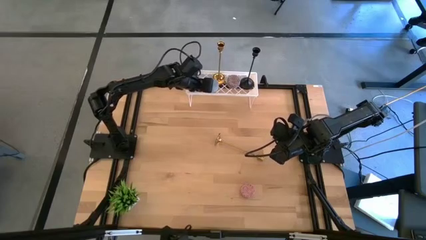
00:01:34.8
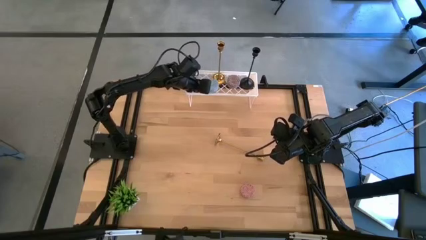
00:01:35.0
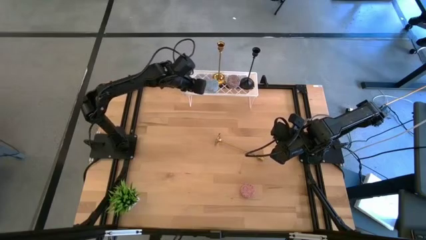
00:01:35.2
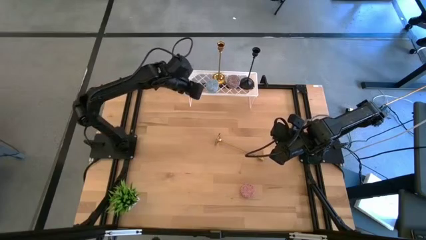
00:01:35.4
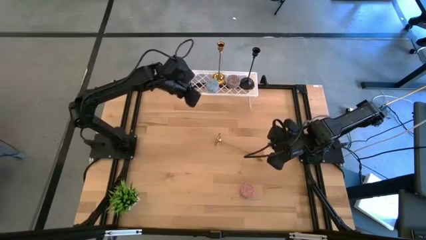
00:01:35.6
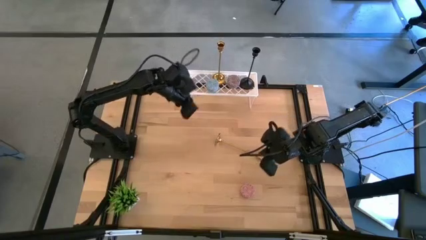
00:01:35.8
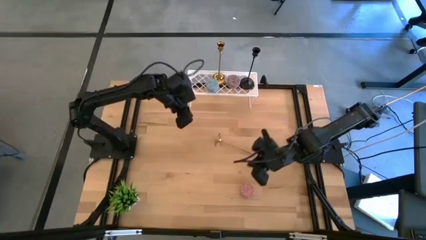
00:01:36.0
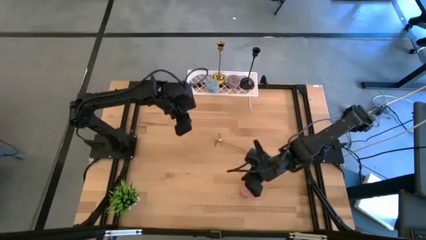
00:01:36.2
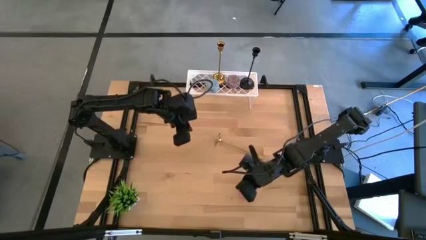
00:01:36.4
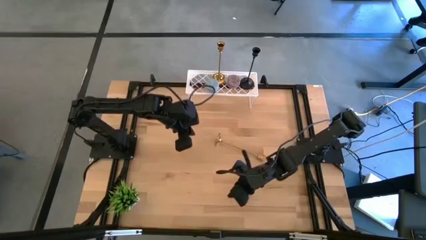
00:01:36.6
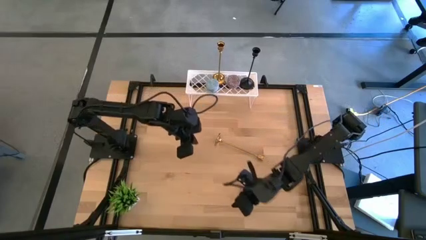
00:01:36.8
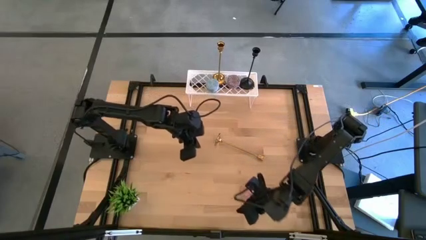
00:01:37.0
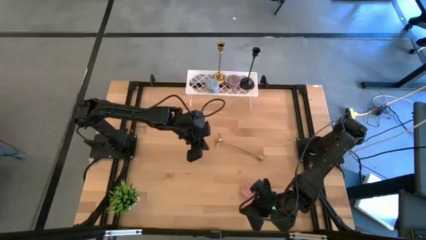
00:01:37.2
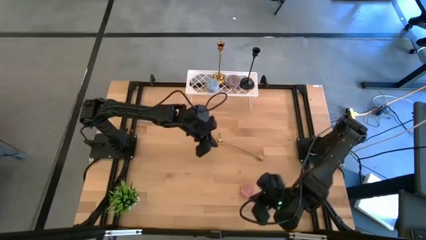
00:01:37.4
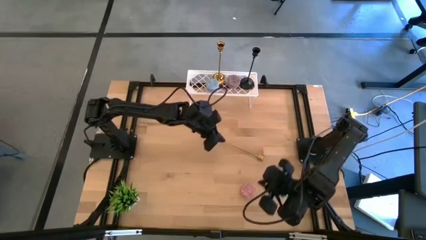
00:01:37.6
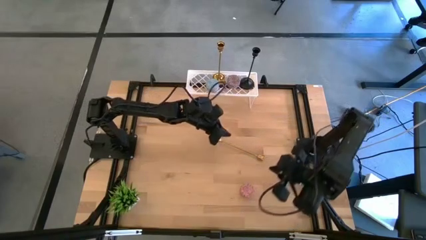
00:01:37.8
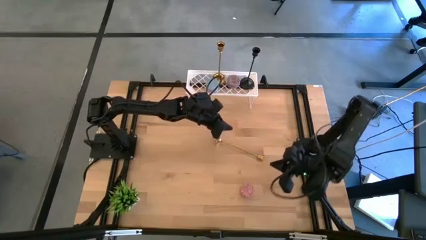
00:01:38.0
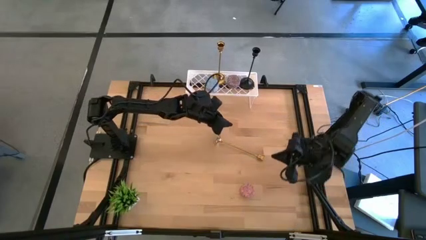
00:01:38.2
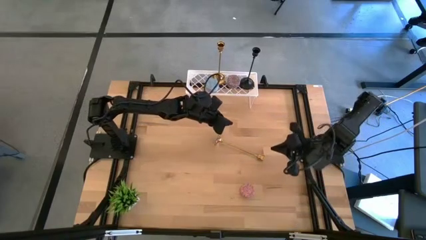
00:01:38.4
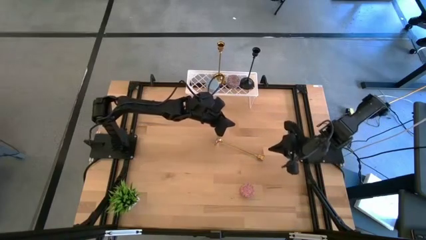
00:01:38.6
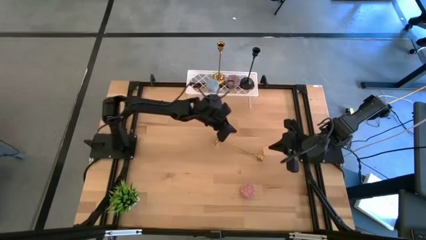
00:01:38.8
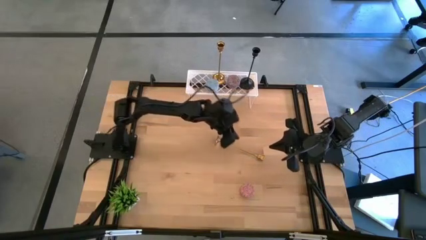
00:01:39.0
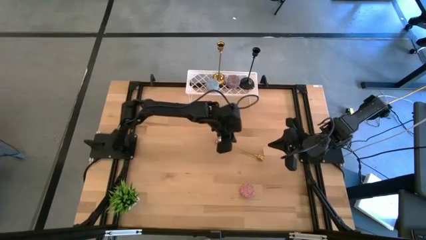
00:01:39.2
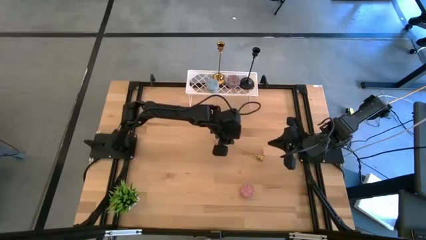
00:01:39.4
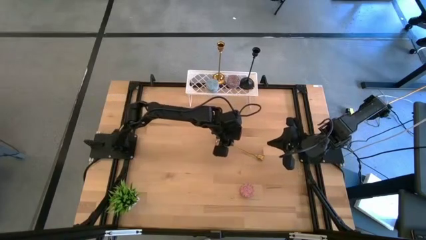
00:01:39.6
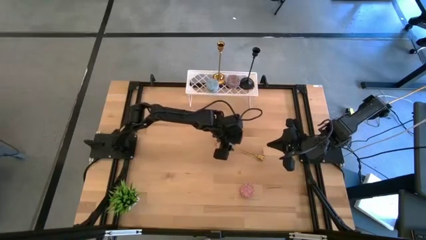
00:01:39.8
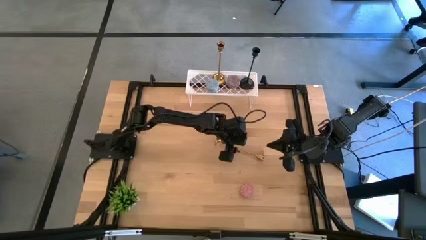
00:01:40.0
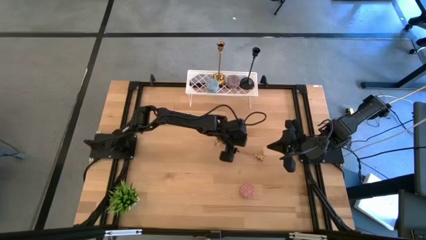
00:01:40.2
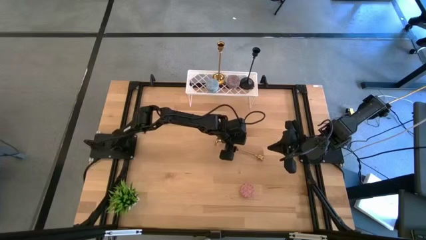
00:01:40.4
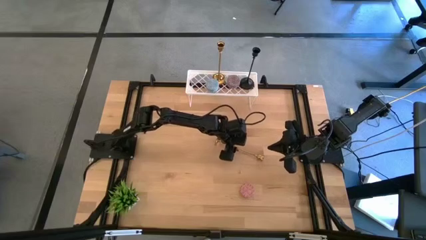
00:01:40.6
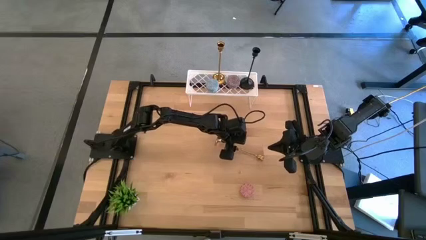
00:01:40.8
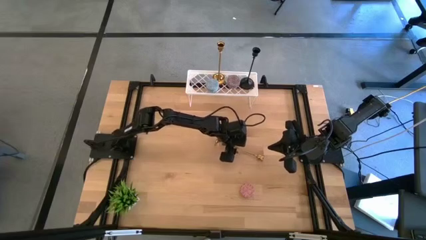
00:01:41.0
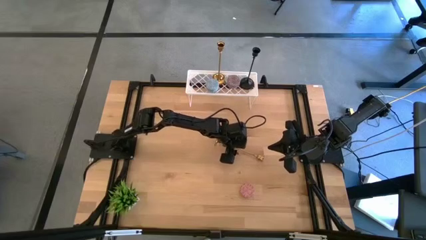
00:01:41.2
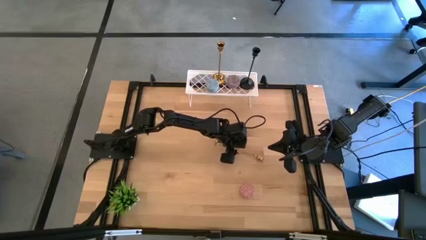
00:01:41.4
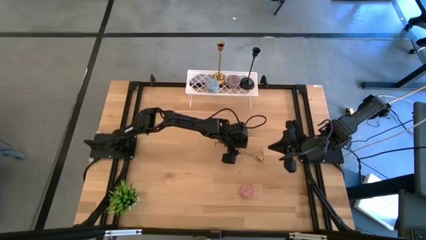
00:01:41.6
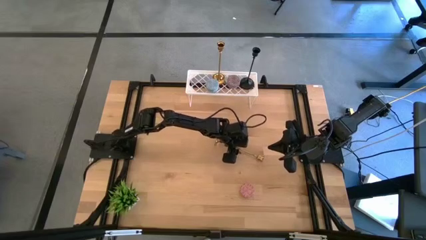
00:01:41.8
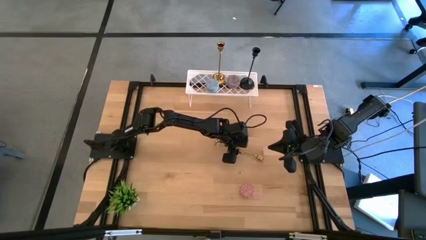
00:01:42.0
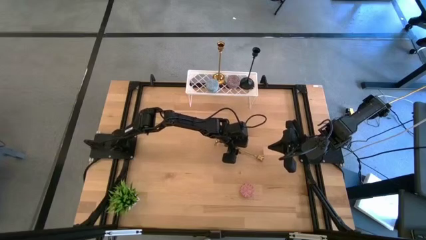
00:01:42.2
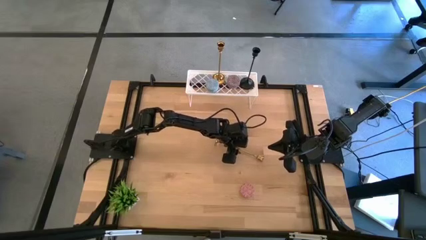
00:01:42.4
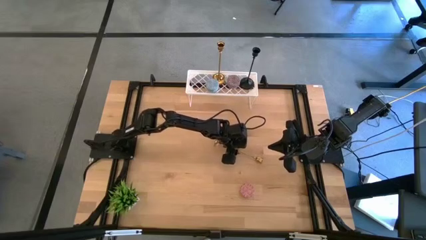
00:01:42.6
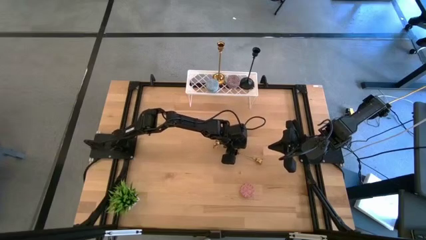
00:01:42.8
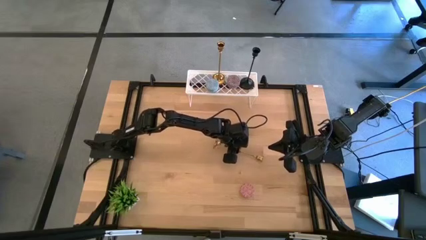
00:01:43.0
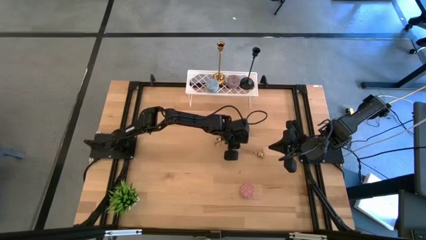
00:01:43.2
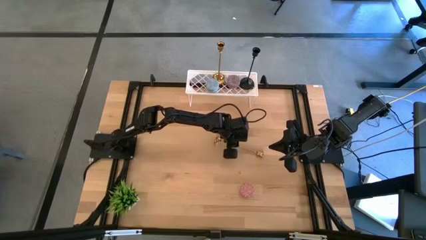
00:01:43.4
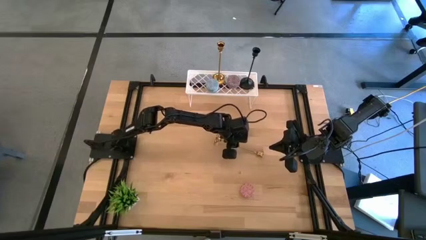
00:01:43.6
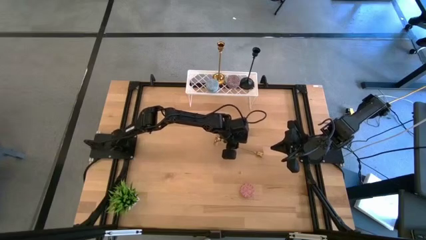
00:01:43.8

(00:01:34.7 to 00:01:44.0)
Task: Pick & Place candle stick holders
Put the golden candle holder on the shelf

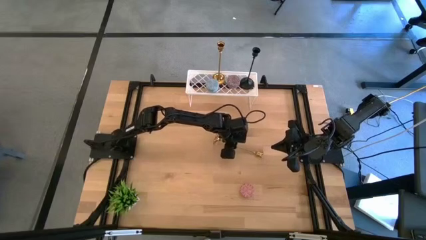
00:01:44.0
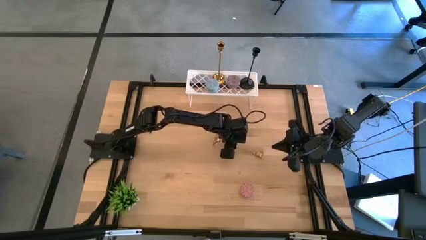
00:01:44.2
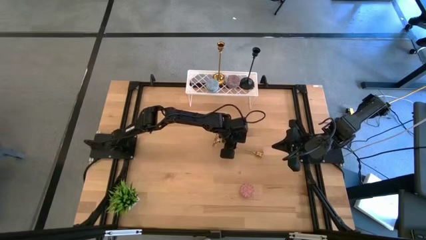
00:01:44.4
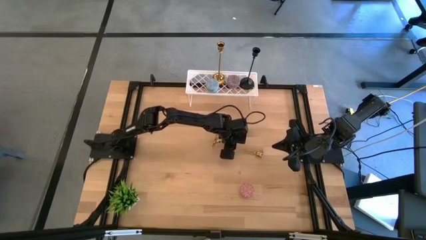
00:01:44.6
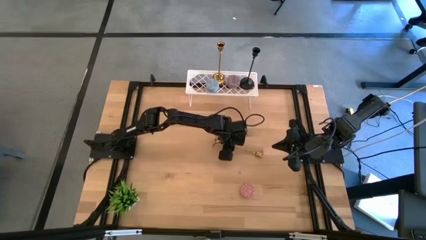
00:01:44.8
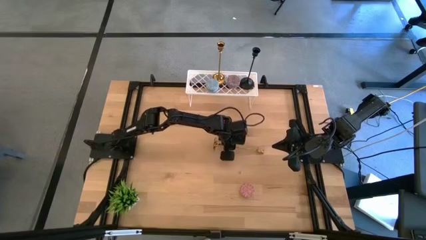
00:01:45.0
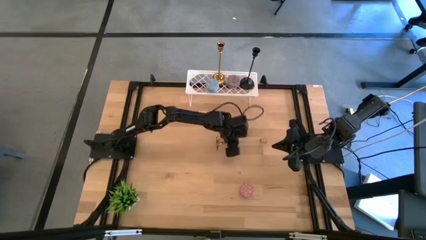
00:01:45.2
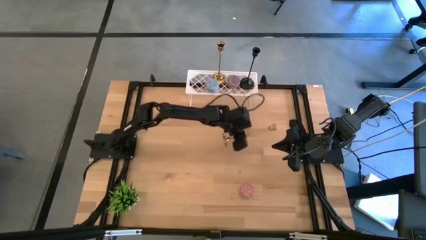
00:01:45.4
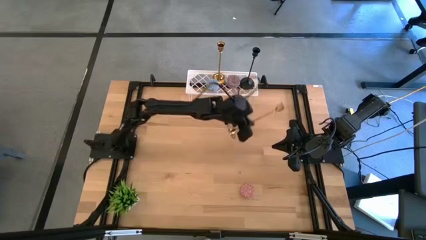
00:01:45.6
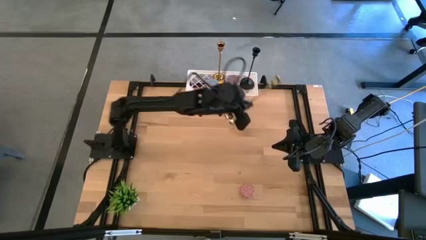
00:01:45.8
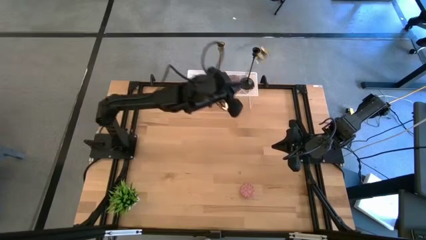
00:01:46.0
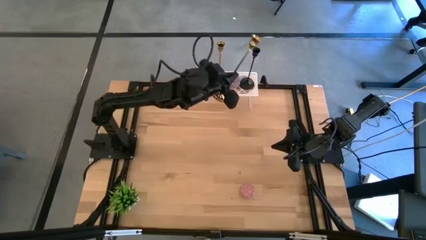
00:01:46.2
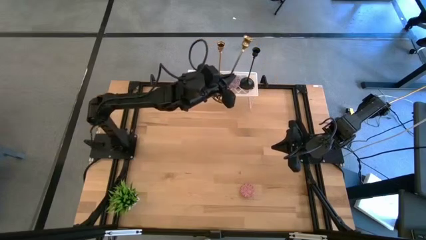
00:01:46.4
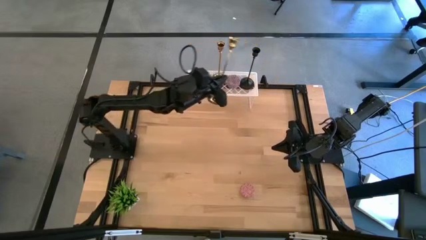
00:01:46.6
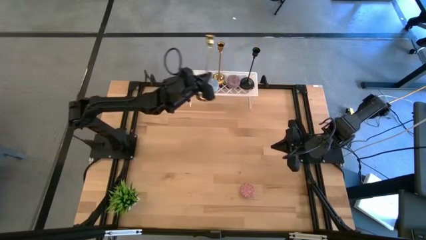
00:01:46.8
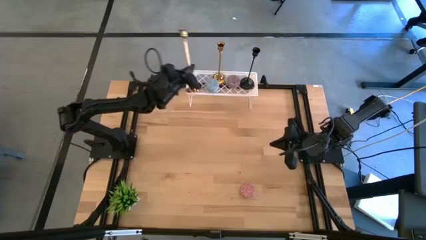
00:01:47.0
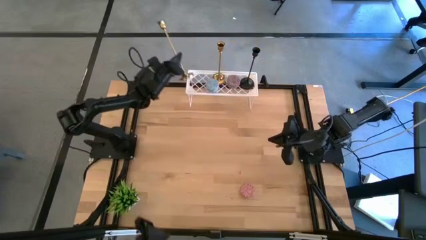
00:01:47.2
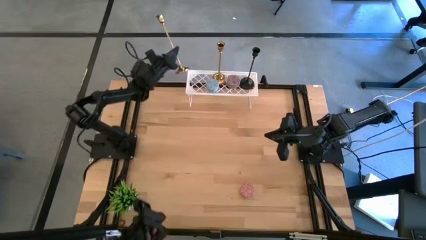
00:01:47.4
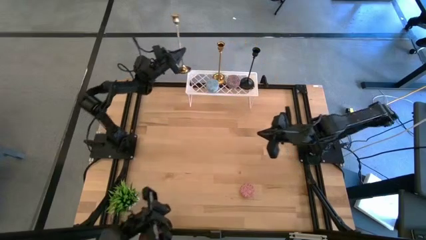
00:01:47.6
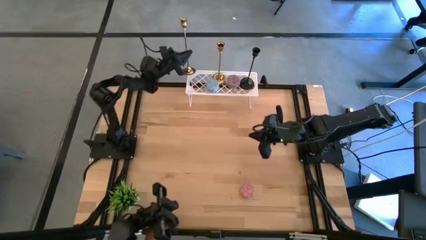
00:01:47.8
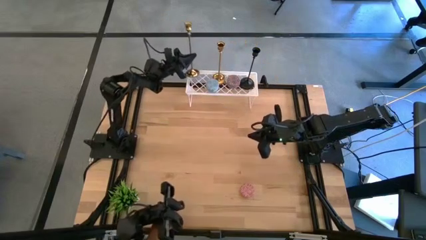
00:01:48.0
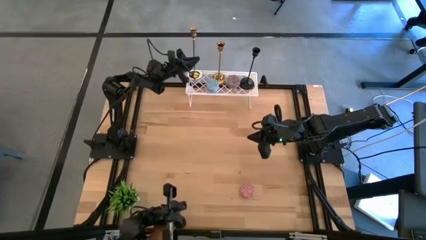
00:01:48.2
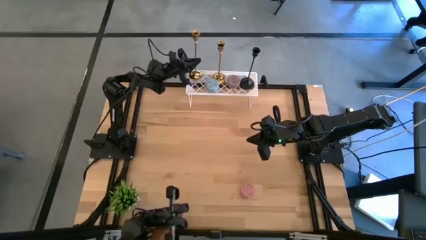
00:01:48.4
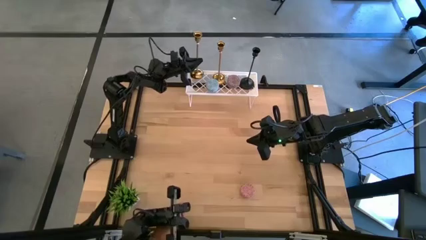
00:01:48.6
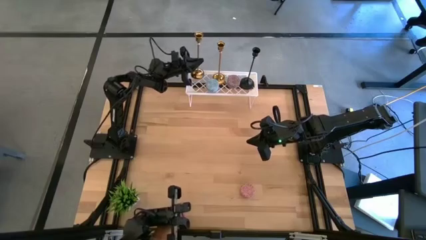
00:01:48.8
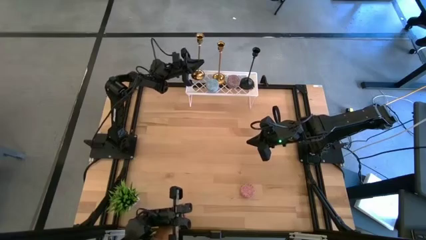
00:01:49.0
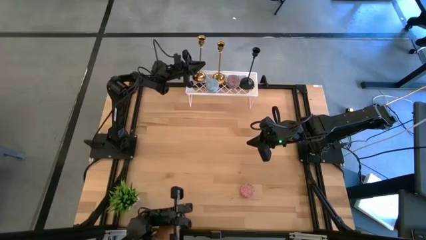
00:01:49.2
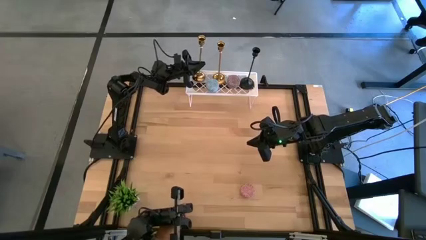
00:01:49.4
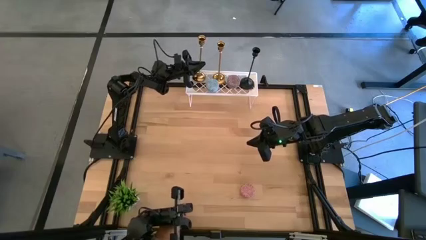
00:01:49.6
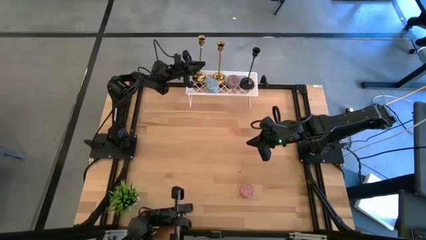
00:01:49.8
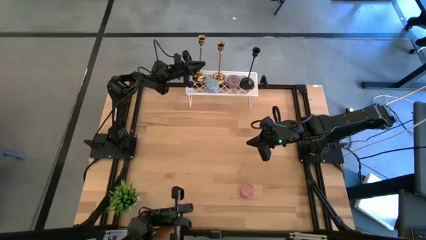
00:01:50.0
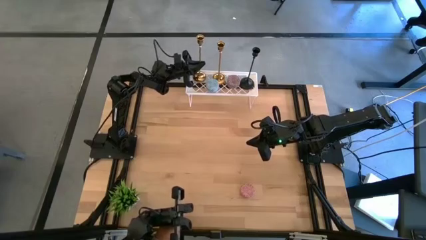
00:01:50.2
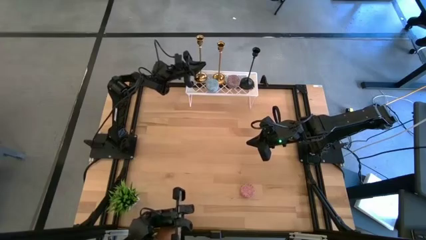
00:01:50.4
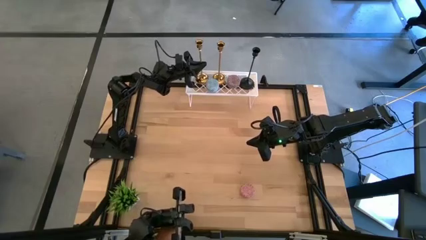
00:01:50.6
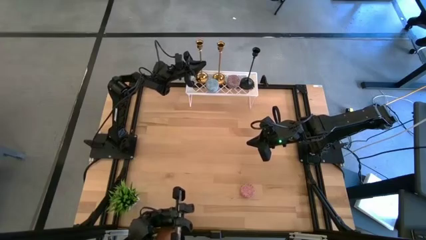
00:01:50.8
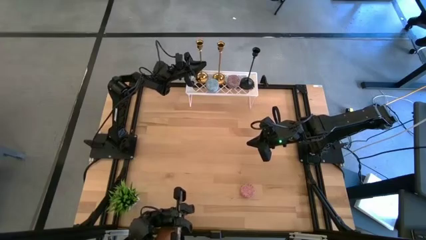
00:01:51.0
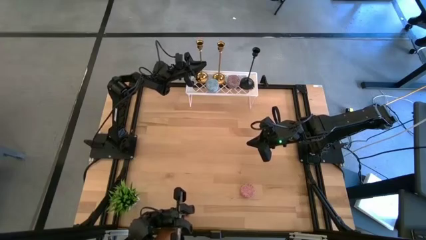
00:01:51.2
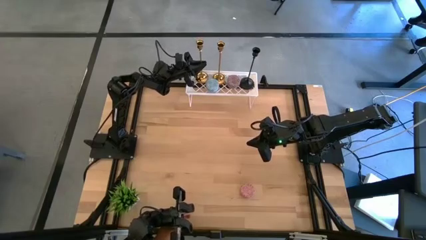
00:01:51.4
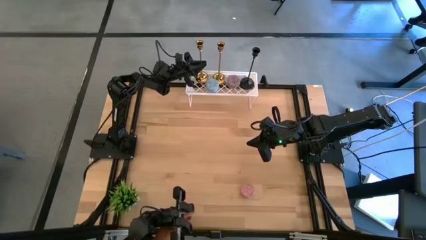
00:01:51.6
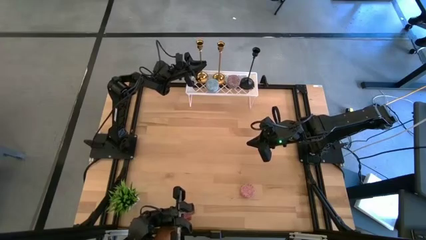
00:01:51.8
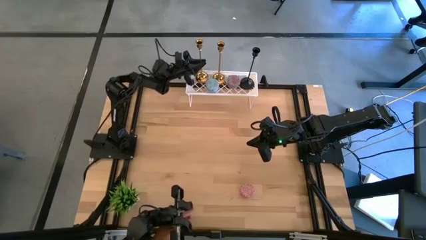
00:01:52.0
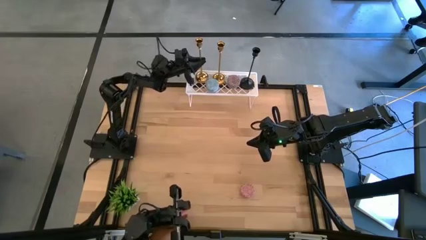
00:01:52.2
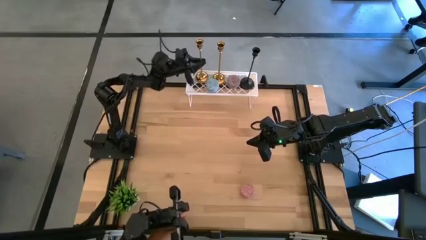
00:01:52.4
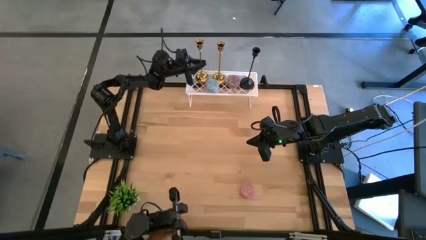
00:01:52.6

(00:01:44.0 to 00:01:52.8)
Put the golden candle holder on the shelf
